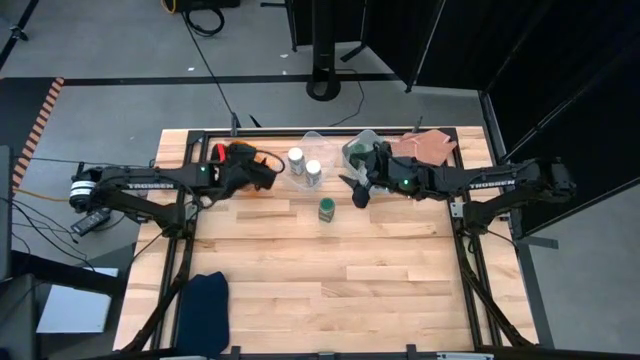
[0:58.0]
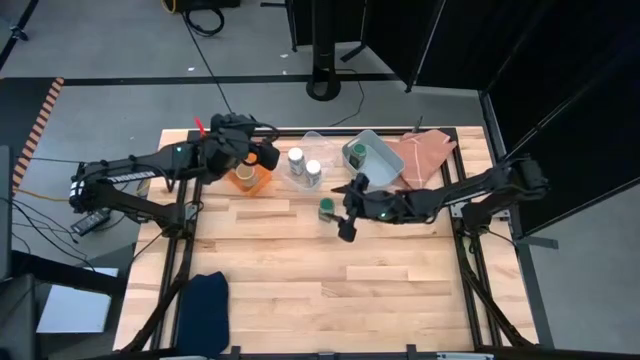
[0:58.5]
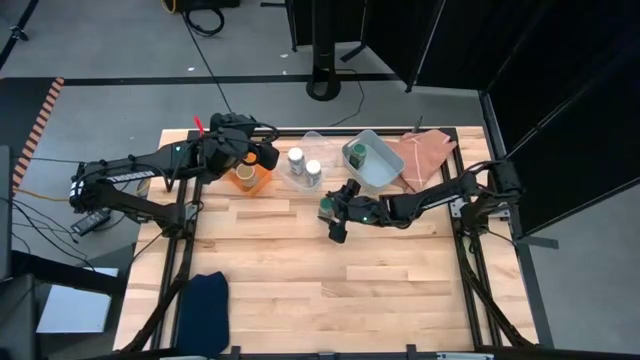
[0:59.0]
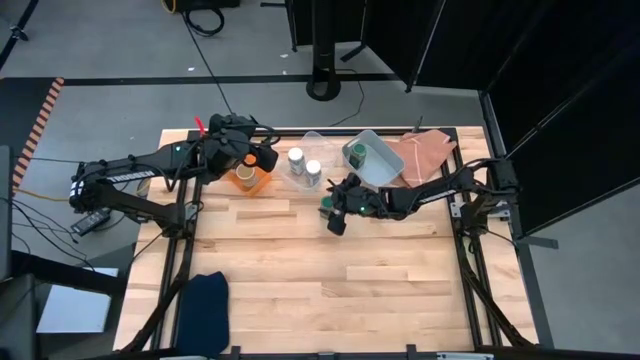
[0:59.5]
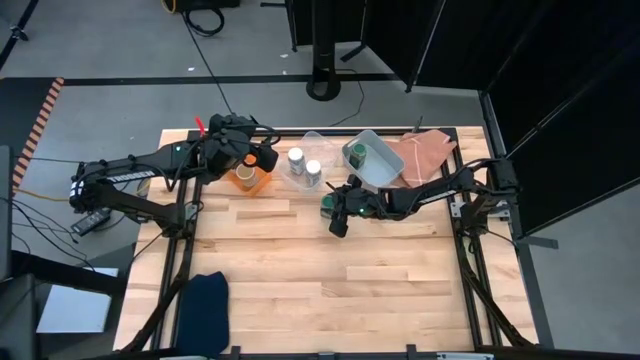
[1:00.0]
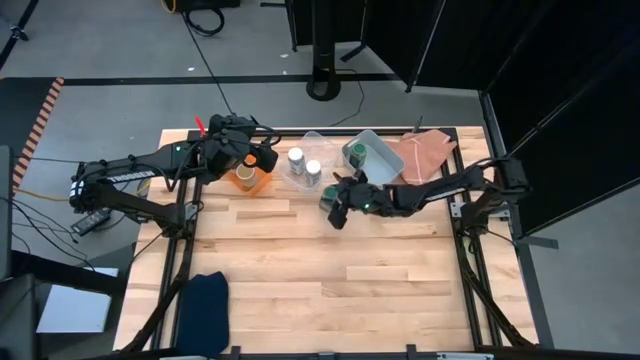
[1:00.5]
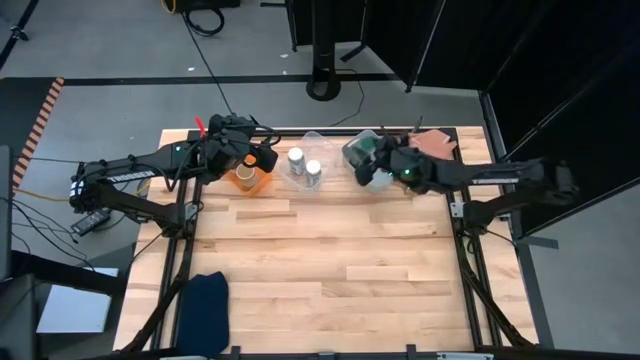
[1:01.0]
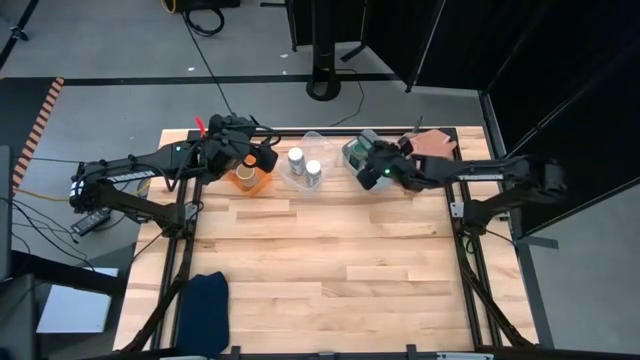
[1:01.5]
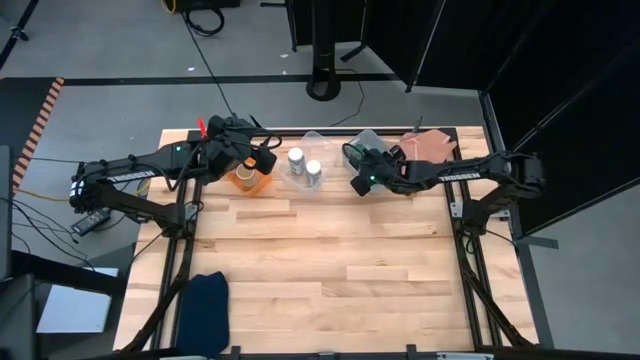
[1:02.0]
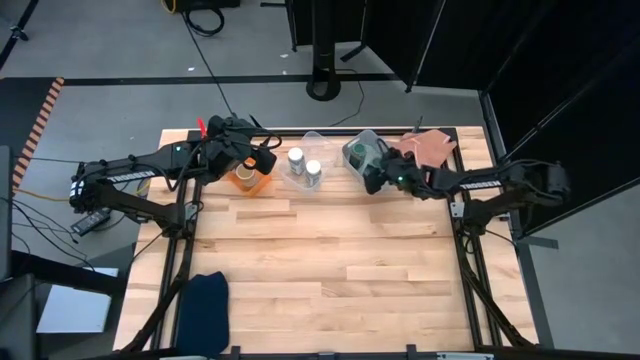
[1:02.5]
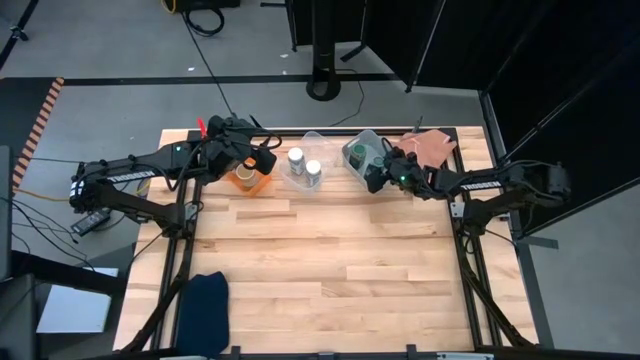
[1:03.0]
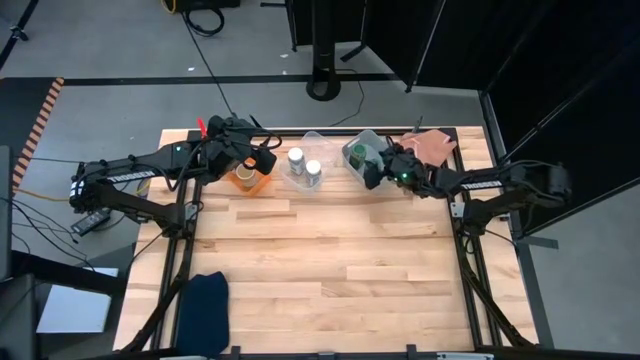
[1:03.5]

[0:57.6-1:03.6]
Task: Sort spices by type
Put a green seasoning bottle into the gray bin

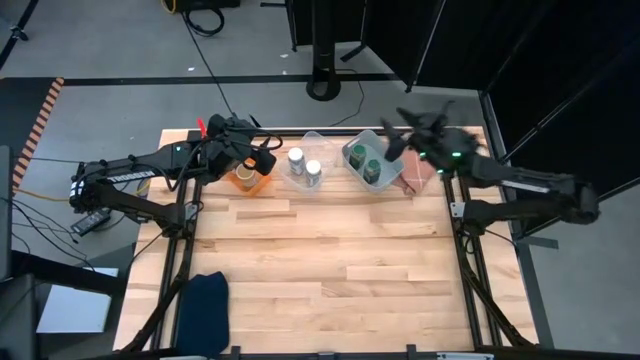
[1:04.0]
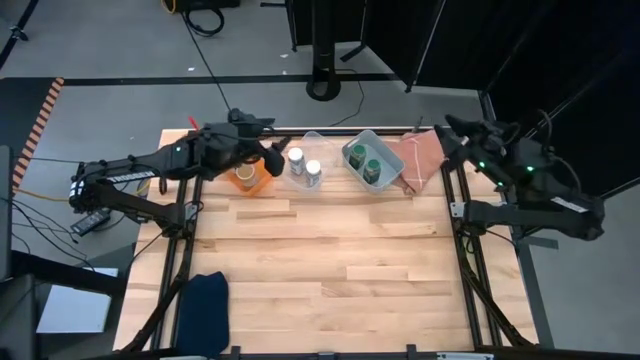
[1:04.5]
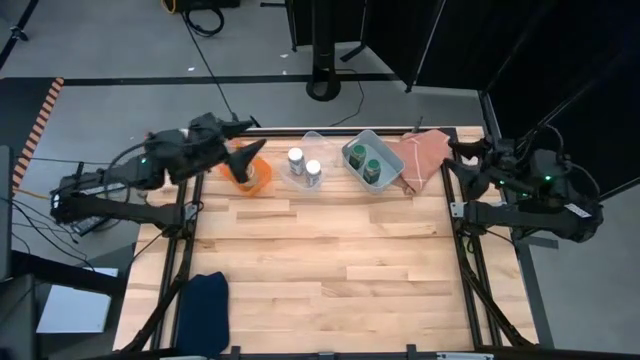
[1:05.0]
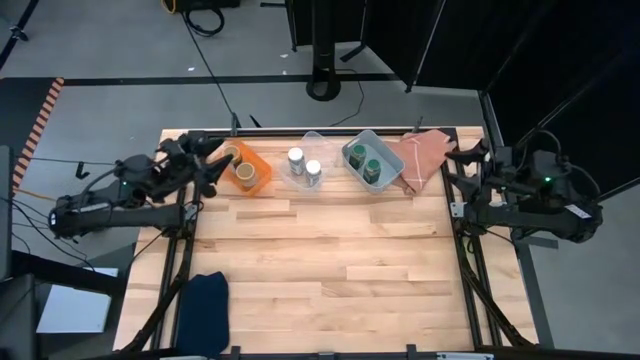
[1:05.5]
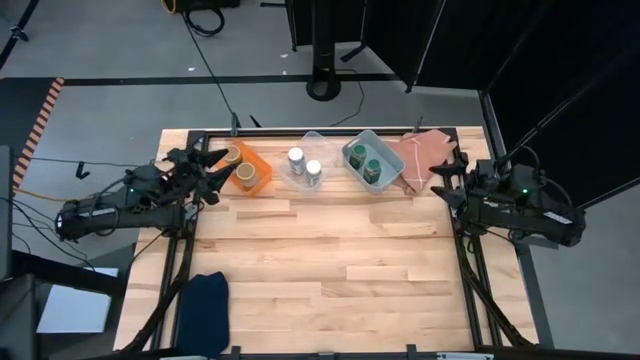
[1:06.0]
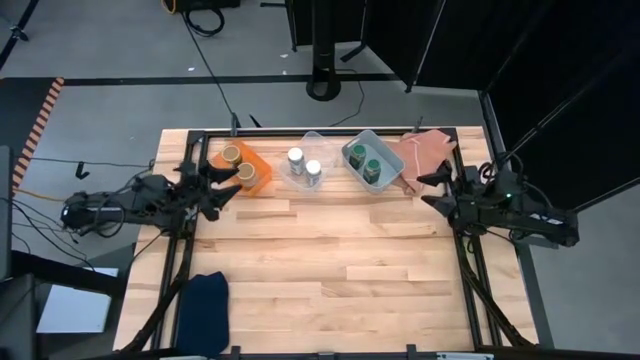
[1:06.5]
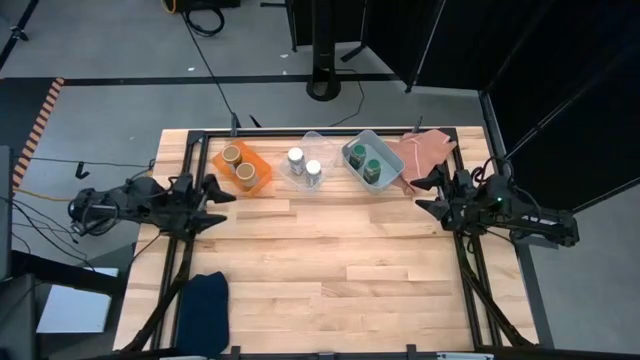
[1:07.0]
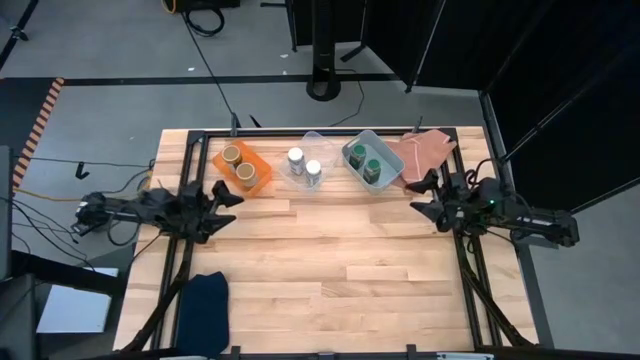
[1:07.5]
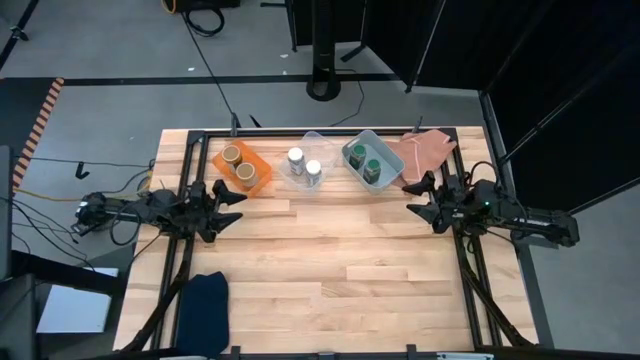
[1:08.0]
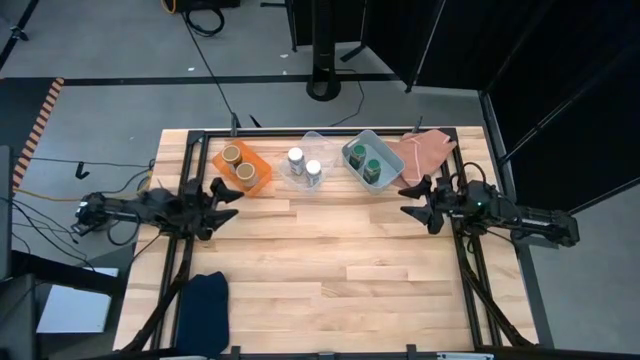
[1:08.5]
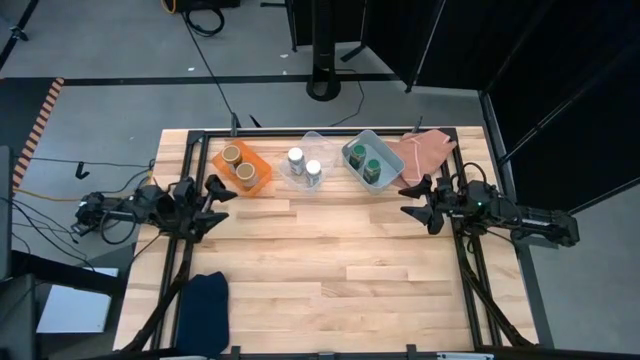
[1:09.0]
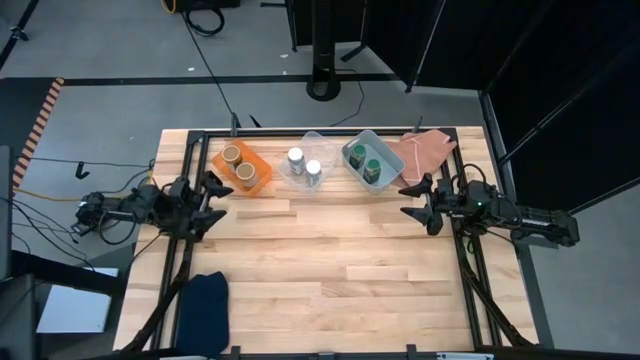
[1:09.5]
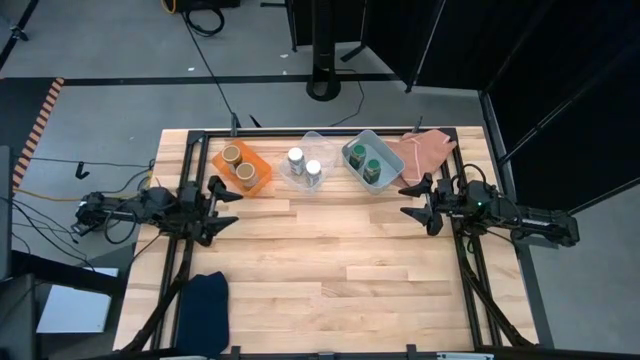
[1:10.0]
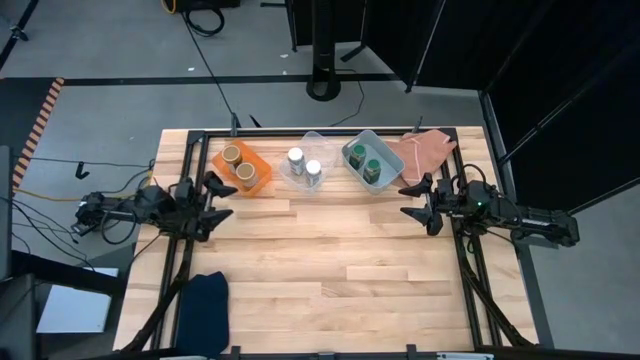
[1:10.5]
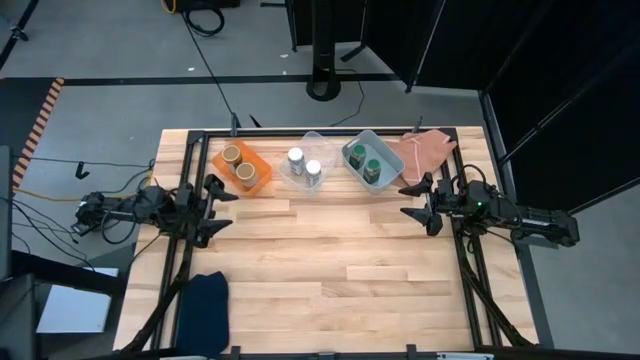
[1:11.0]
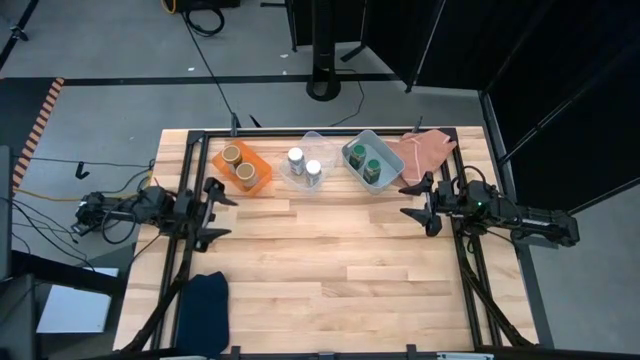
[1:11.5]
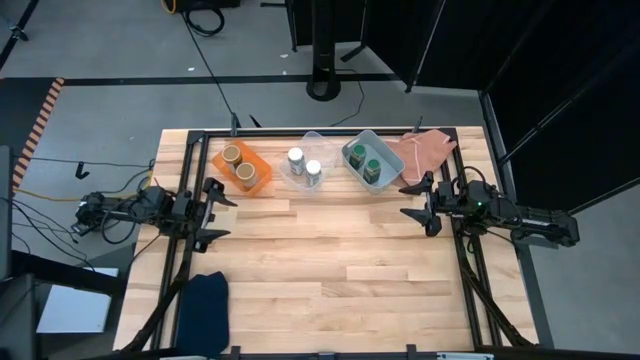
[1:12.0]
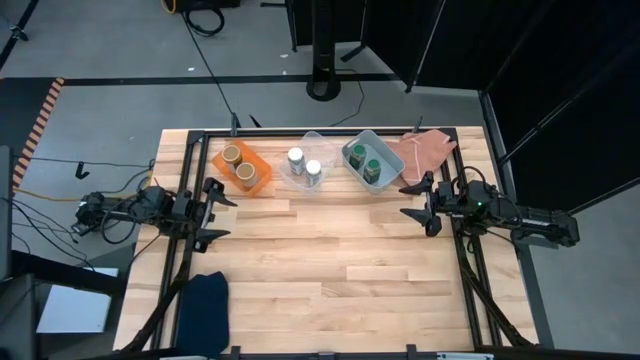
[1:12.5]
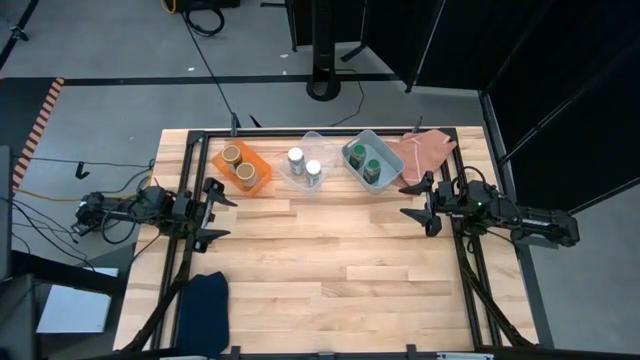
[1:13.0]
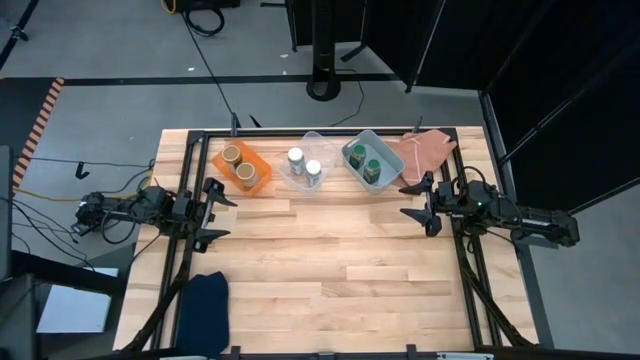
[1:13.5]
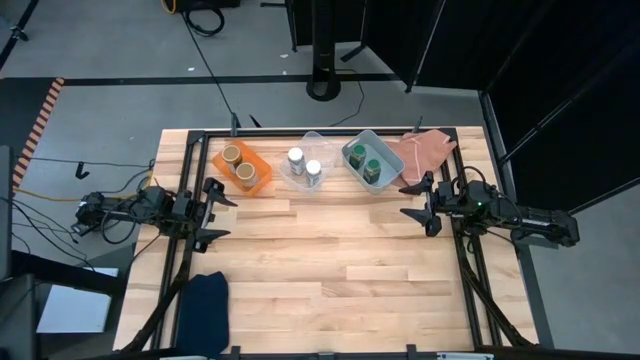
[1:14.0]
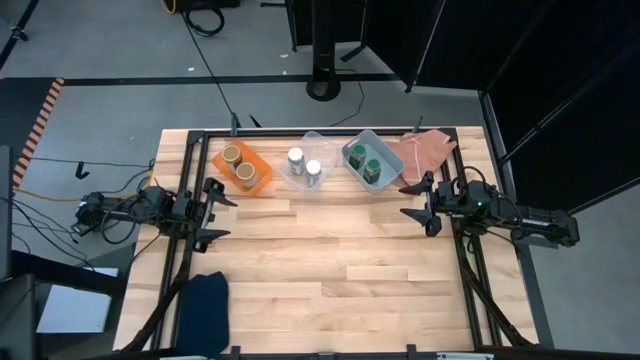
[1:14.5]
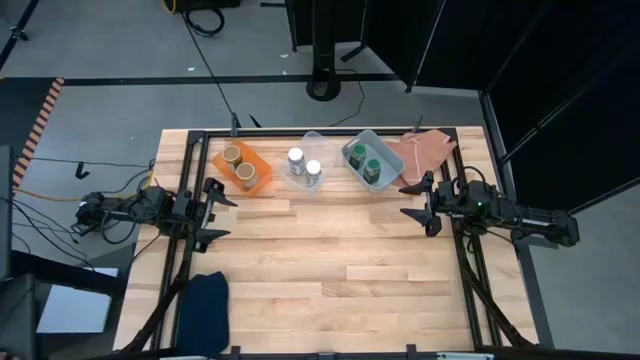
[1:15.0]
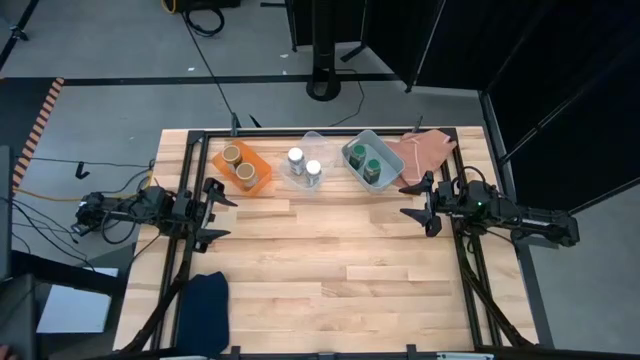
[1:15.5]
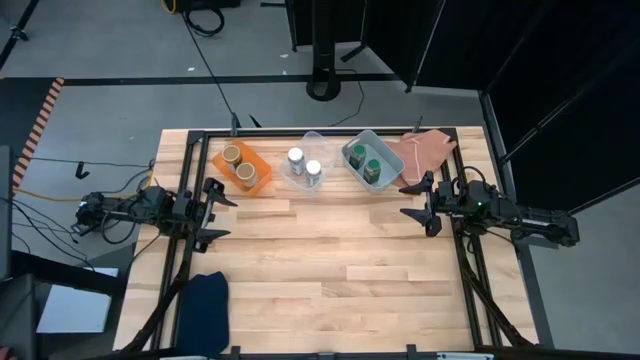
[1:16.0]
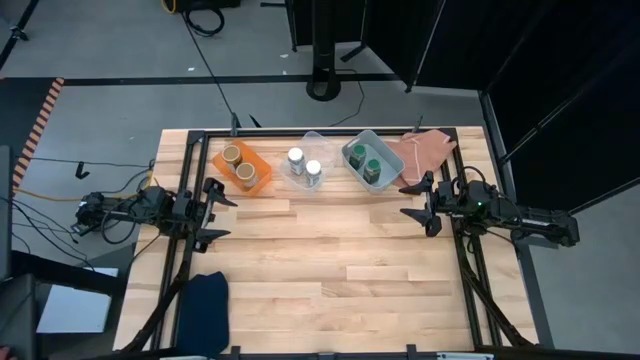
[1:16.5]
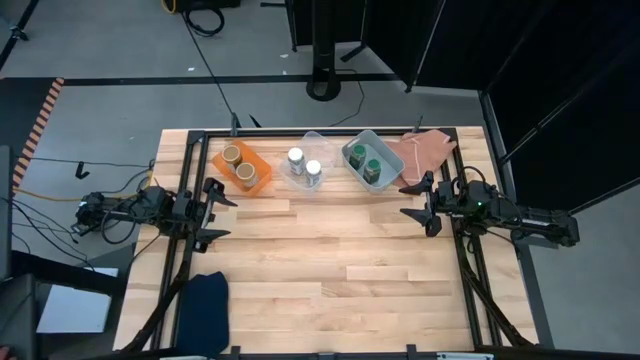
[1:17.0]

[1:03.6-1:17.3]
Return to Home Position

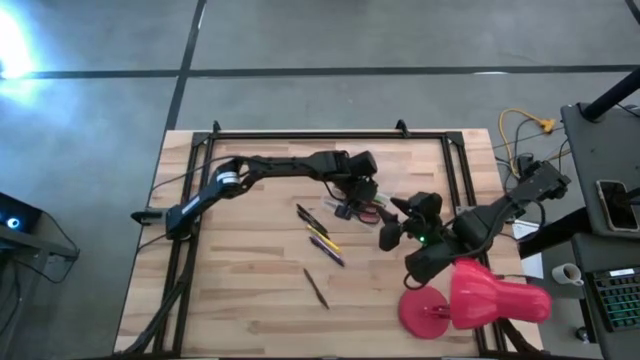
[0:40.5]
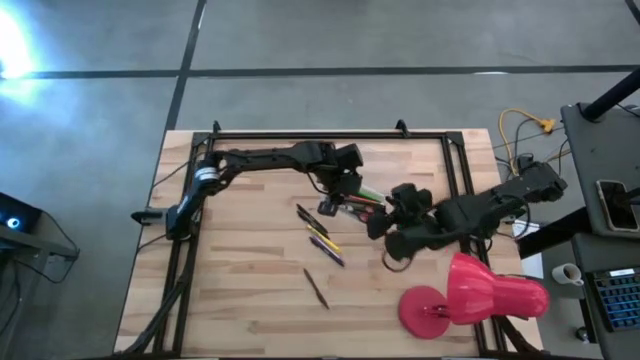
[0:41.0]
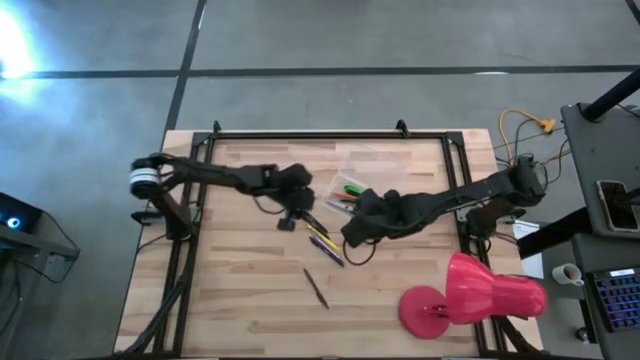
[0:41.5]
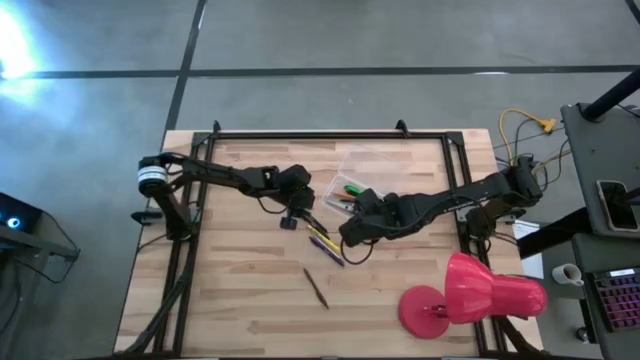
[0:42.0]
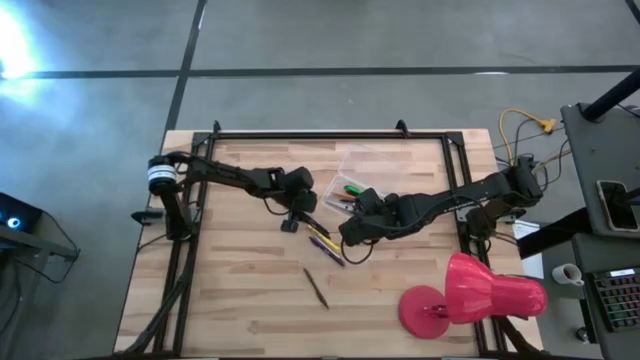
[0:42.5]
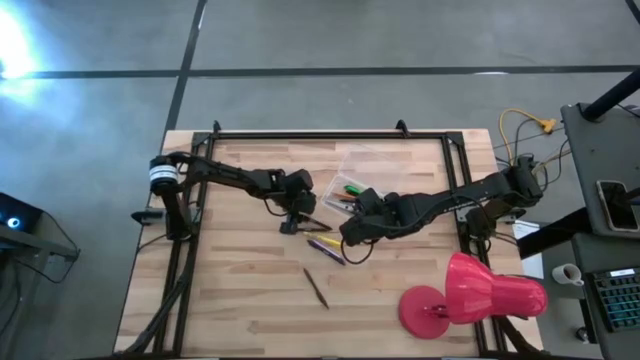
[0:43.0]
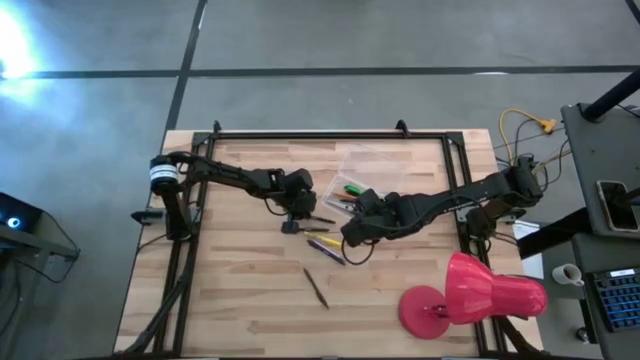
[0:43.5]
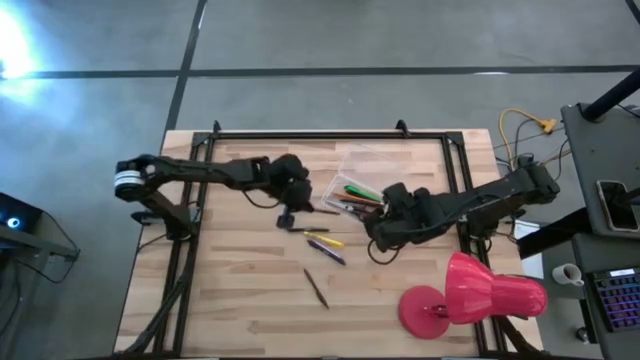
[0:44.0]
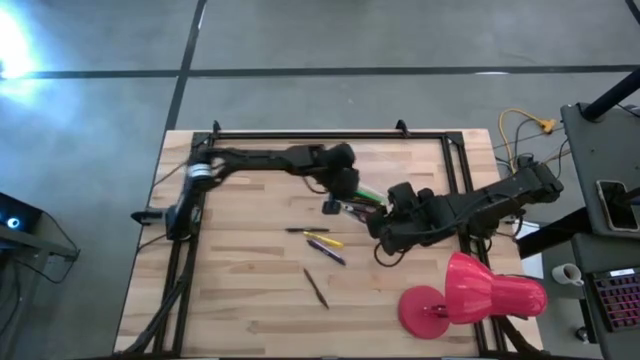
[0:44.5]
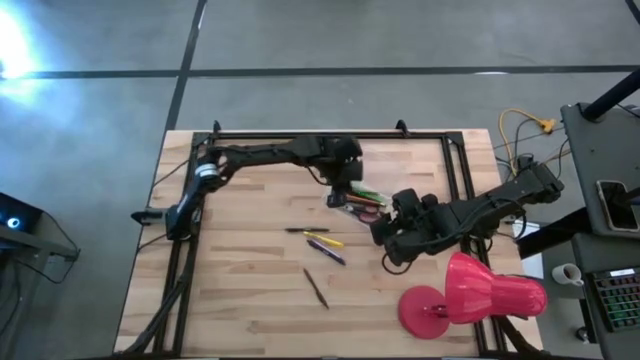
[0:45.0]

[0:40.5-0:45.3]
Task: Pick & place school supplies into a supply box
Put the black pen into the transparent supply box
